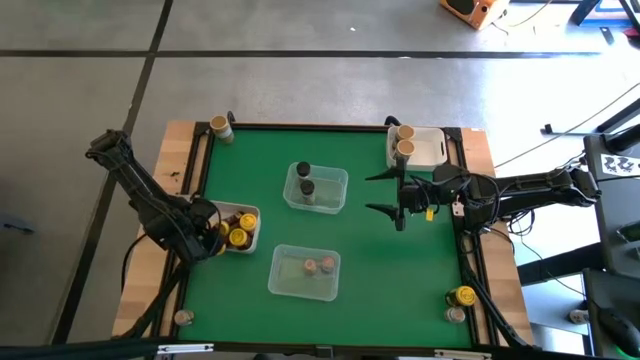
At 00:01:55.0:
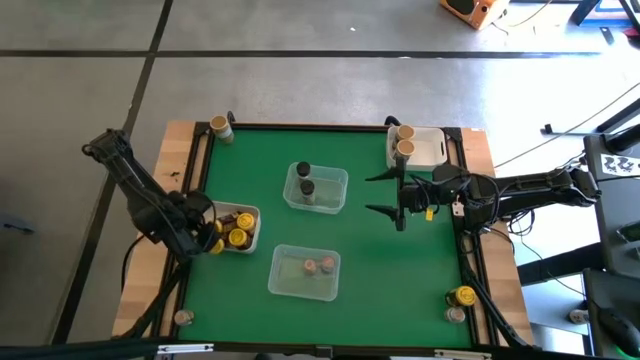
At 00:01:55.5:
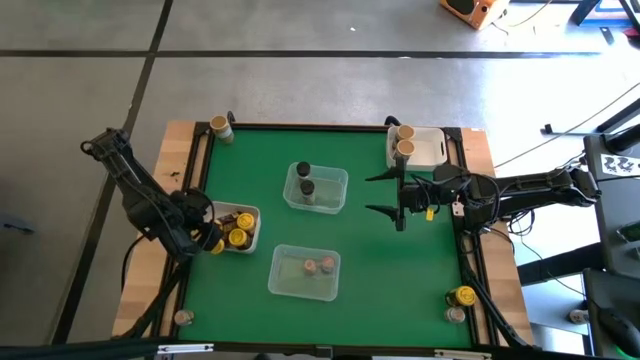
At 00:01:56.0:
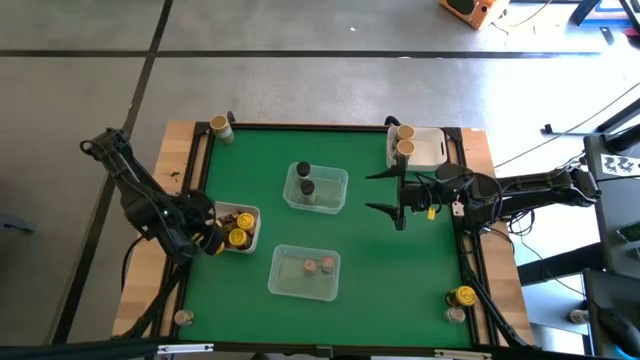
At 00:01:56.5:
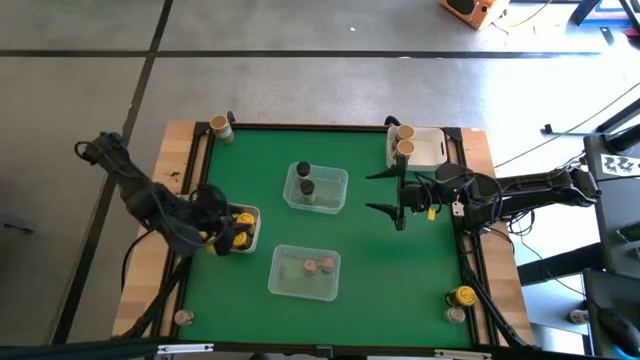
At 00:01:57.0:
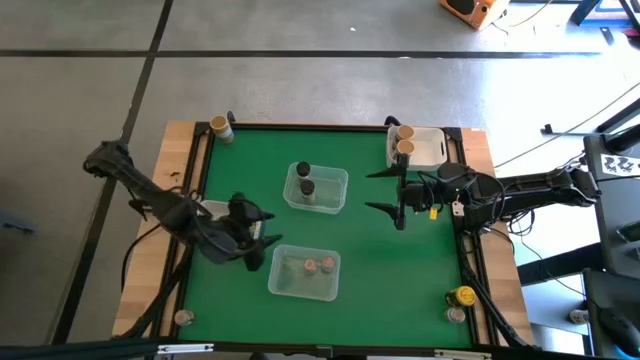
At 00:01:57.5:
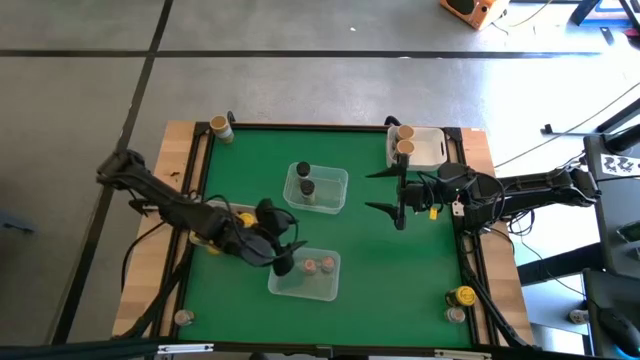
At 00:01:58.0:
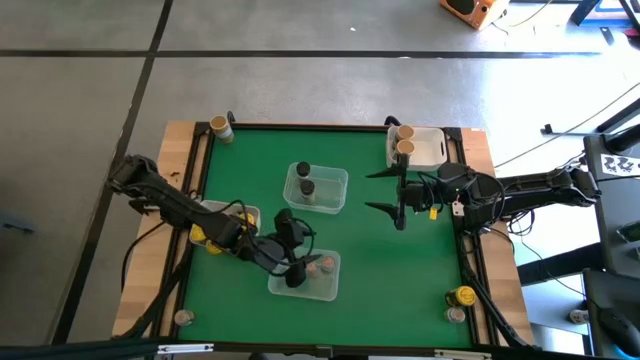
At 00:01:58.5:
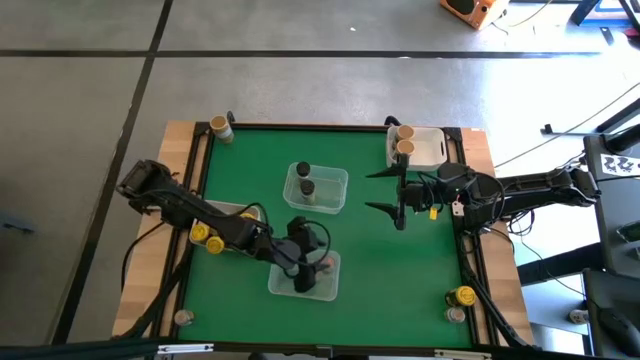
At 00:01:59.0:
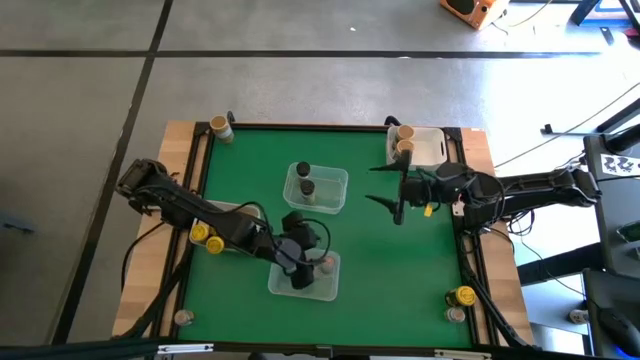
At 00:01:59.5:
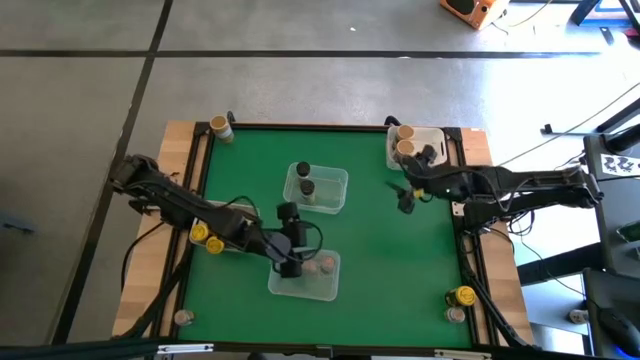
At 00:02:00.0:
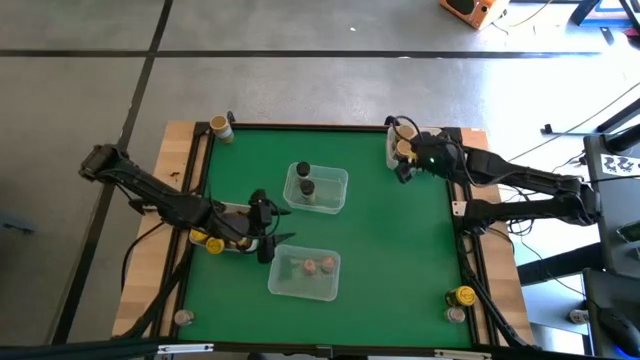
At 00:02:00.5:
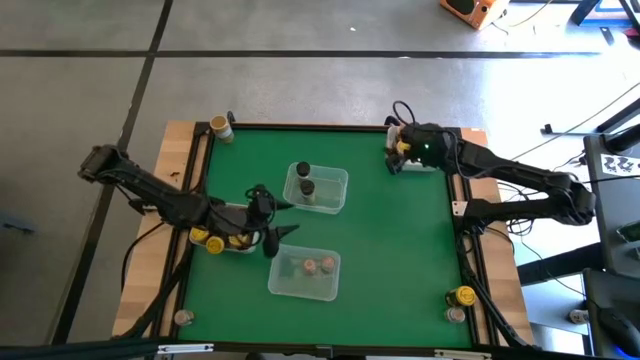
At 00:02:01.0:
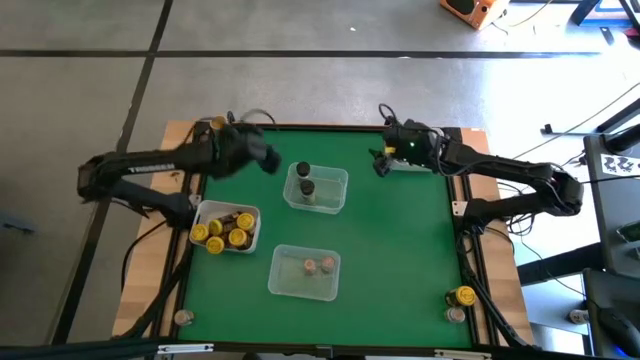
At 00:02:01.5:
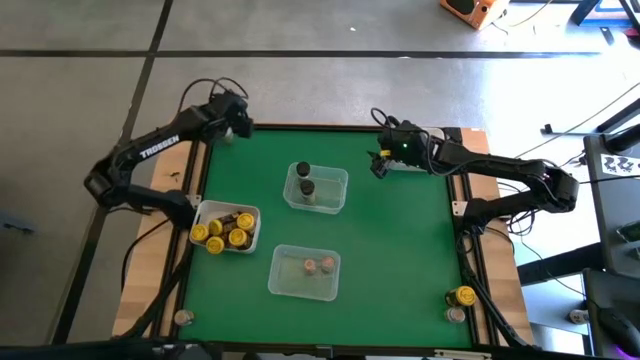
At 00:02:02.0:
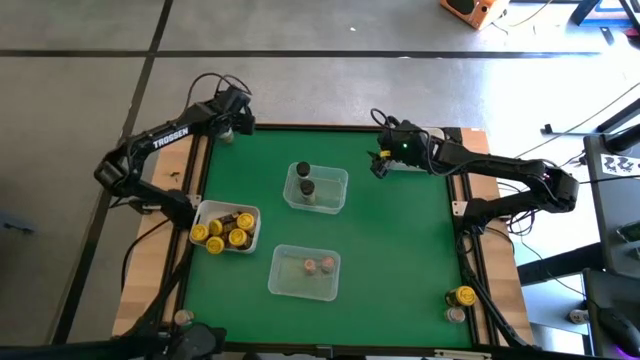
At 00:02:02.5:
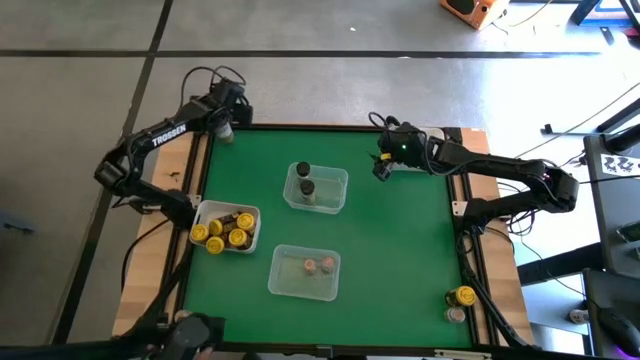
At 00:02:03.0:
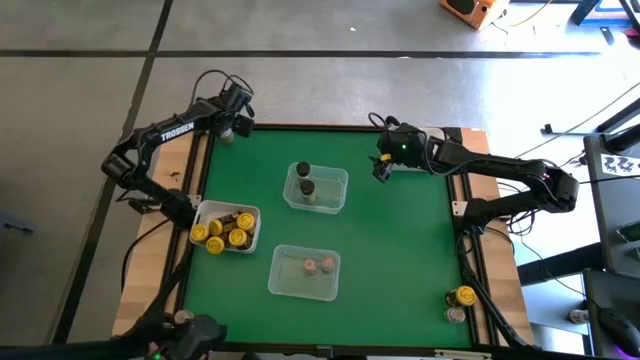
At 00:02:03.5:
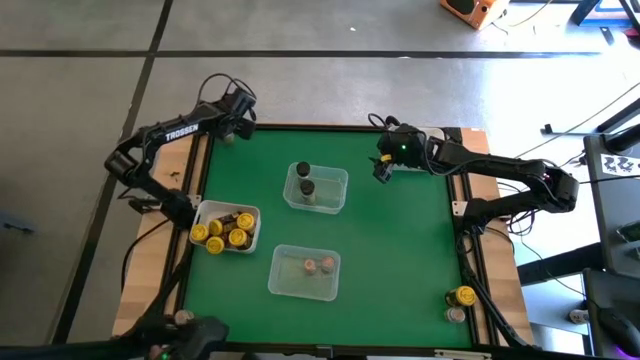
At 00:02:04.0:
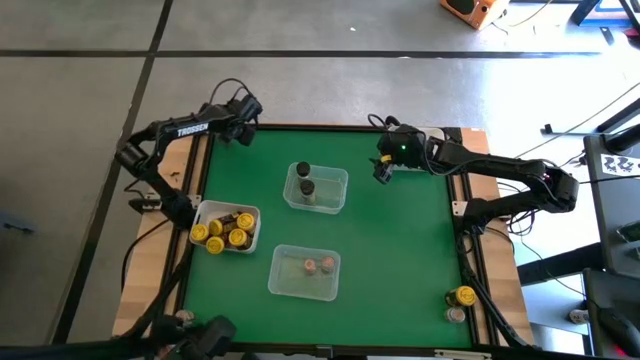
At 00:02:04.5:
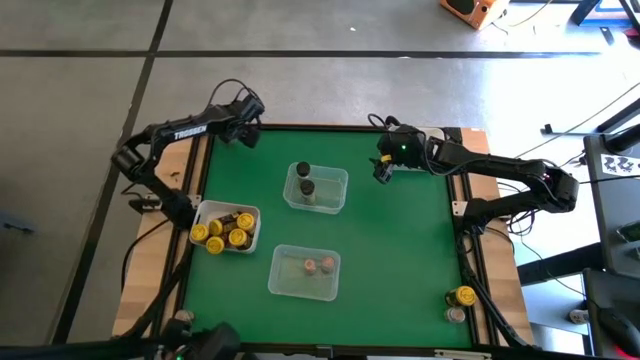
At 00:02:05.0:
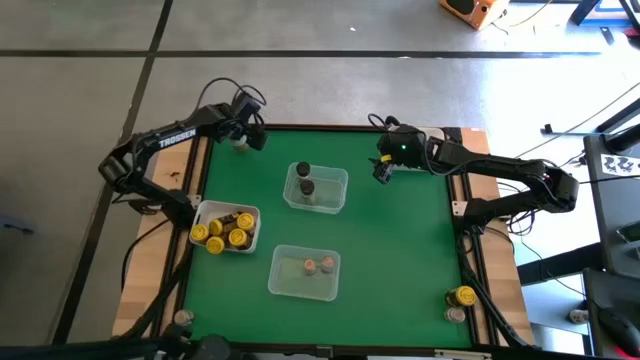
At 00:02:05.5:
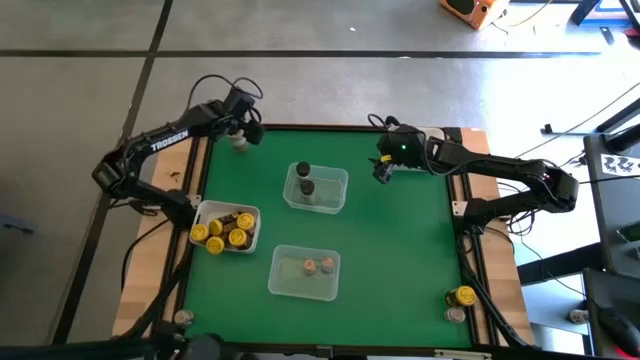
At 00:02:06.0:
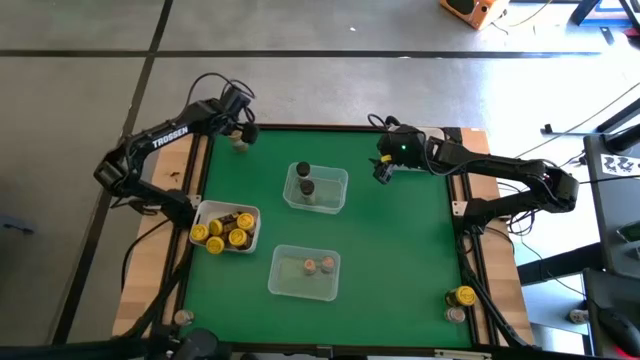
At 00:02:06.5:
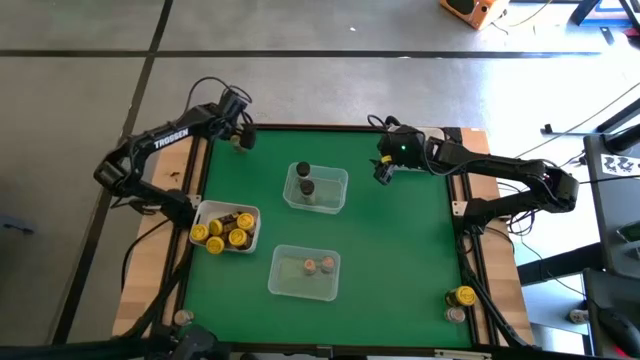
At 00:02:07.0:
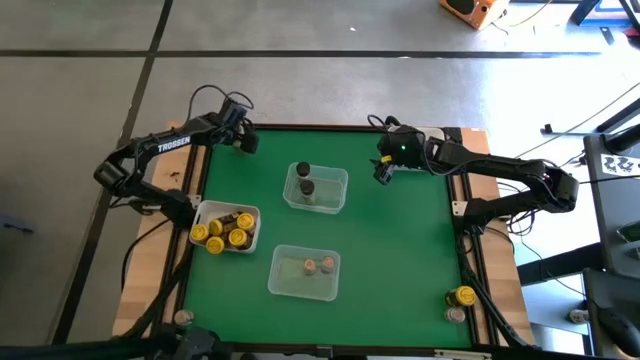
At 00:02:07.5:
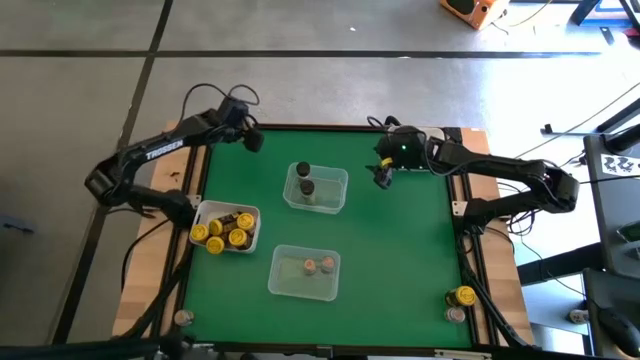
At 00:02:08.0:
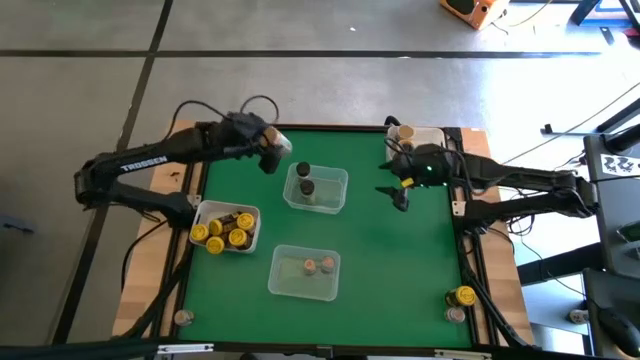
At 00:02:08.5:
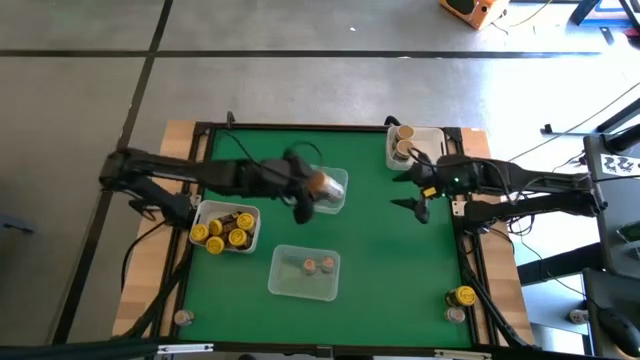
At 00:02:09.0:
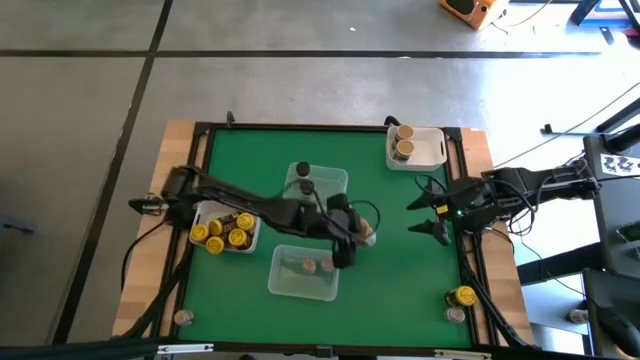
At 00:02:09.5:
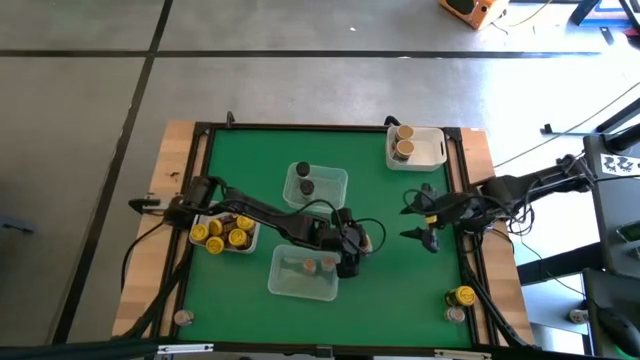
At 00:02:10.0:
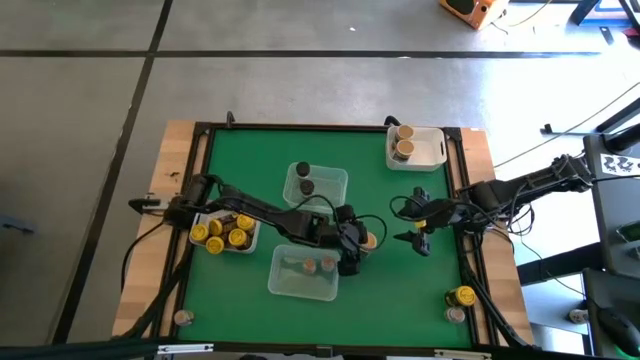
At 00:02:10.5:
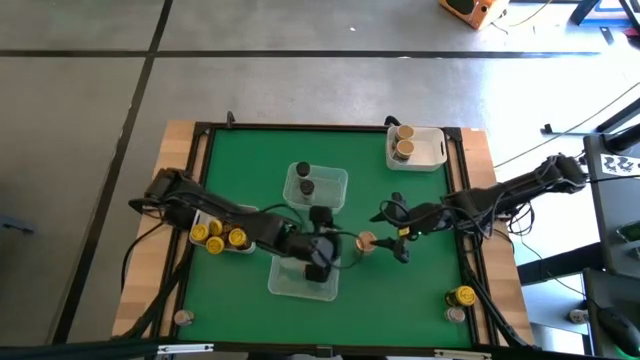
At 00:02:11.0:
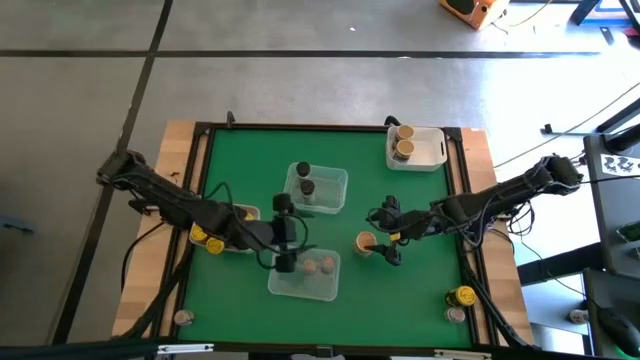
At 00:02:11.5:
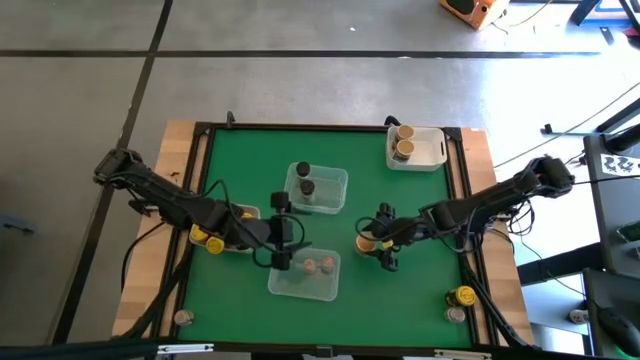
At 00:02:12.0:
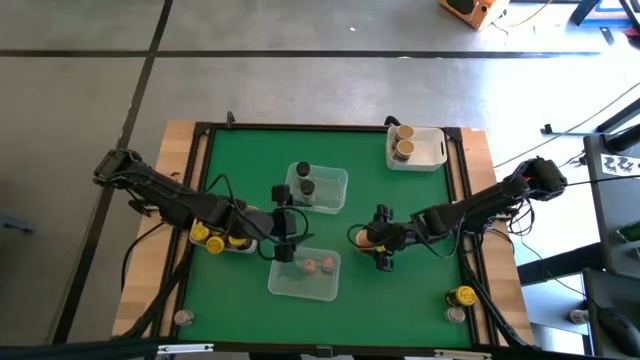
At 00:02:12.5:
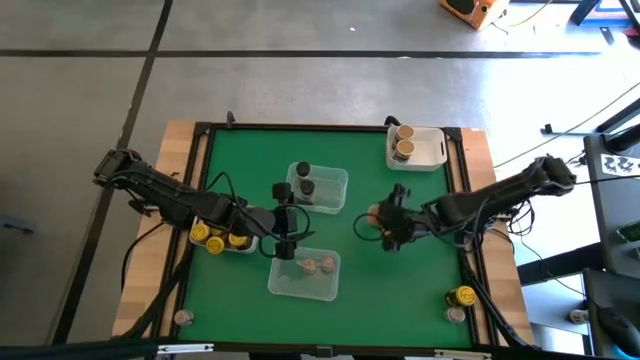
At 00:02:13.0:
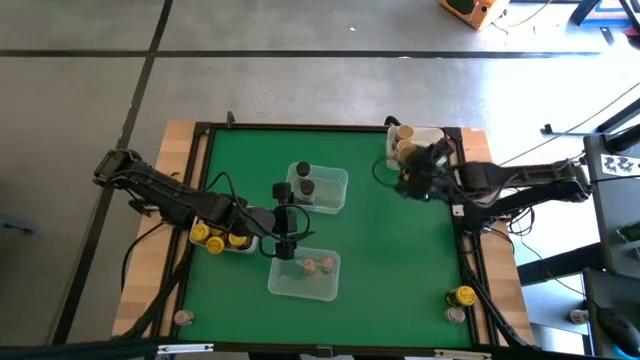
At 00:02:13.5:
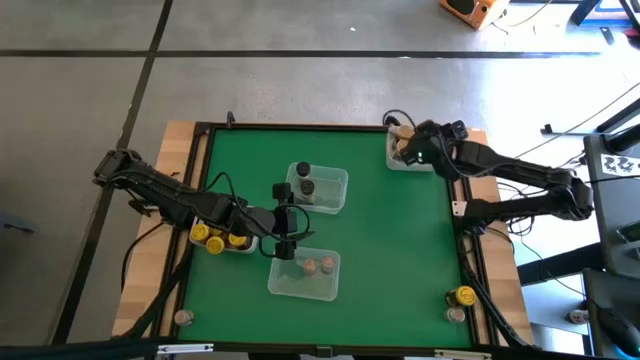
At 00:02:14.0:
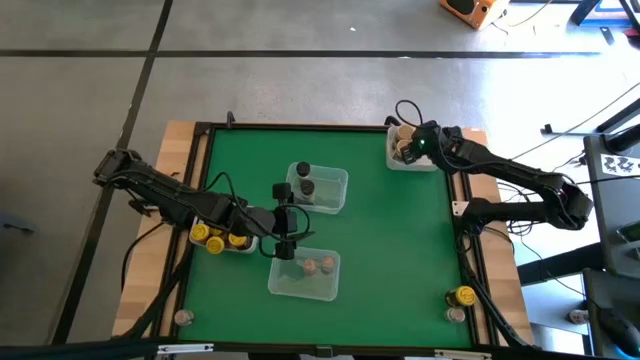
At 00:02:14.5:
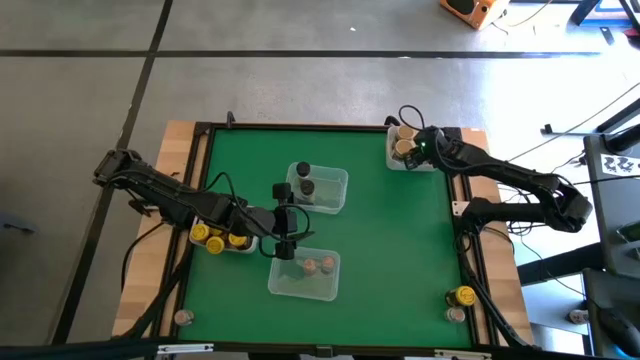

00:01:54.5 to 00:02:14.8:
Task: Sort spices by type
Put the golden spice bottle into the top white bin

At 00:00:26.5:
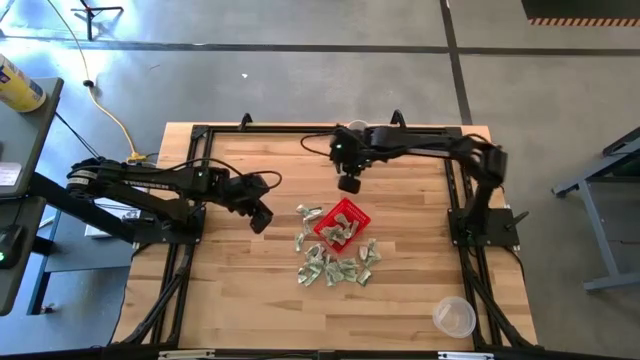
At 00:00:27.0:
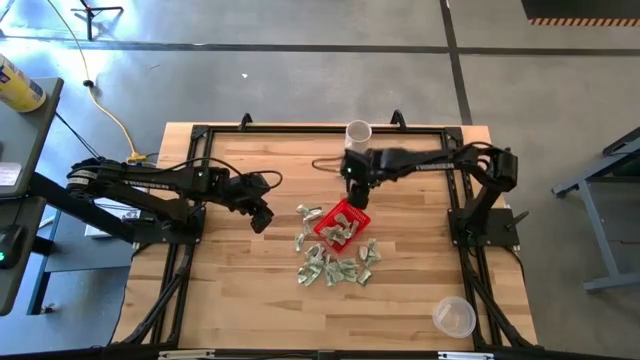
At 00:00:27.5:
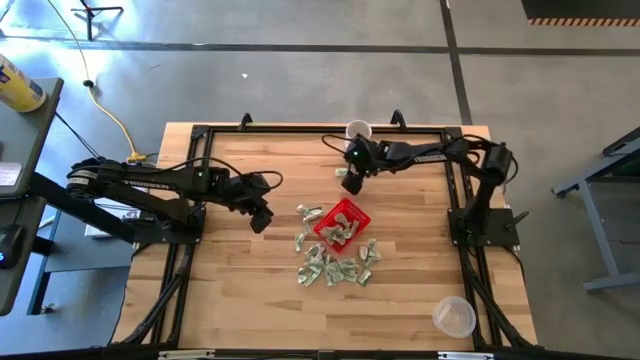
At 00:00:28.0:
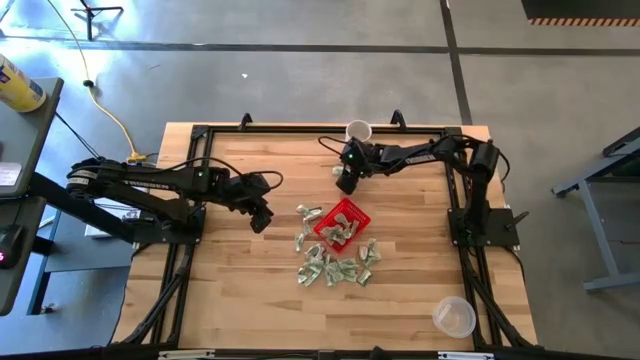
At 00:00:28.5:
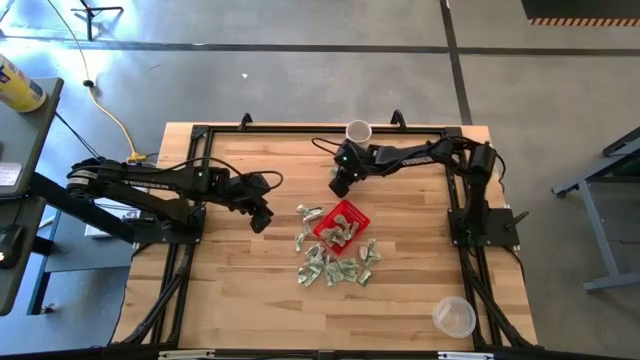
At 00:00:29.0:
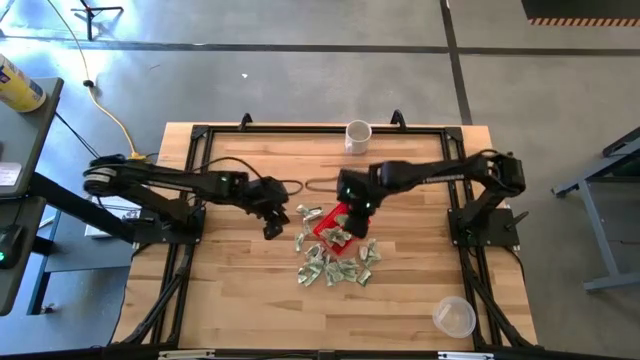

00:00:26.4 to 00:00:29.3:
Task: Pick and place items into bin
Put the white stevia packet into the red bin
